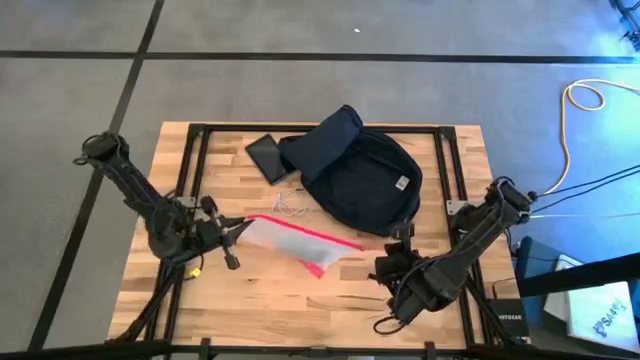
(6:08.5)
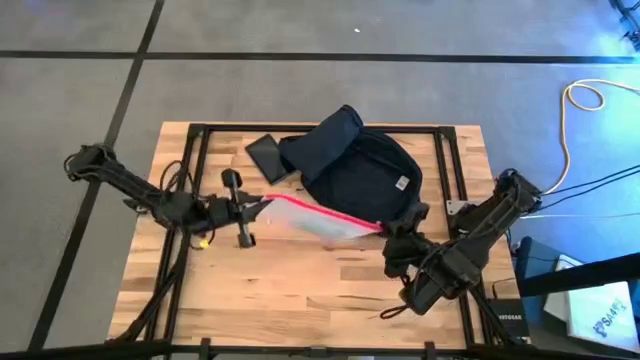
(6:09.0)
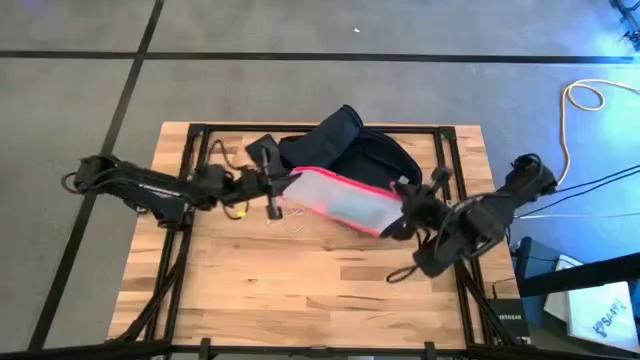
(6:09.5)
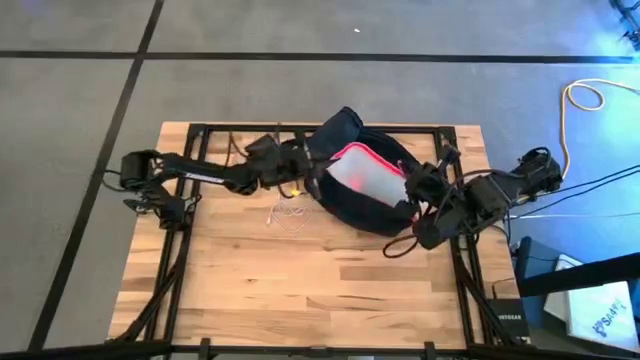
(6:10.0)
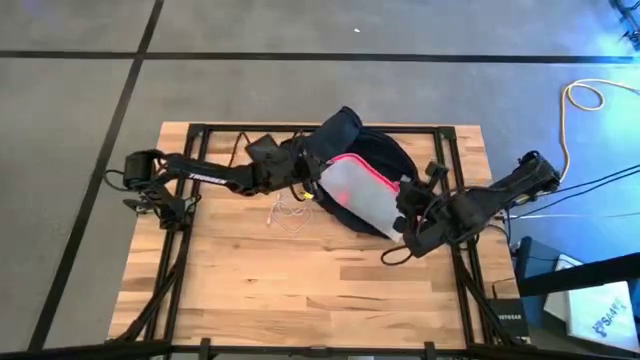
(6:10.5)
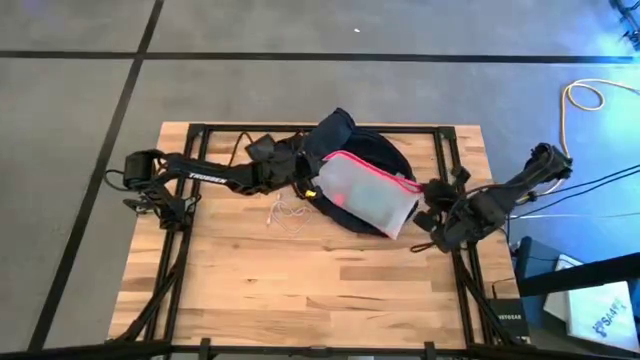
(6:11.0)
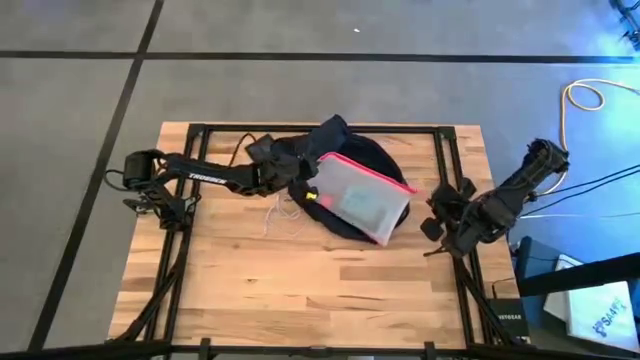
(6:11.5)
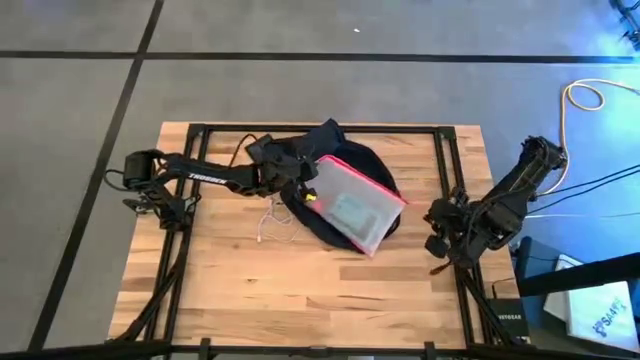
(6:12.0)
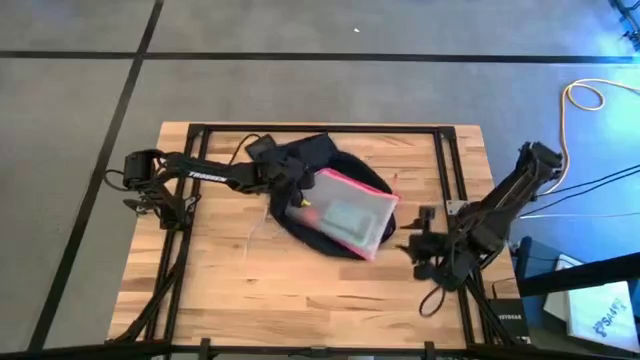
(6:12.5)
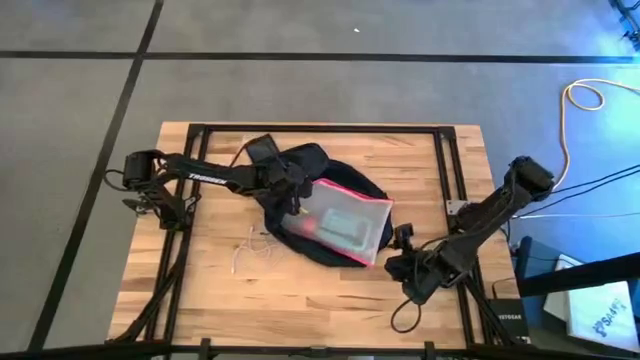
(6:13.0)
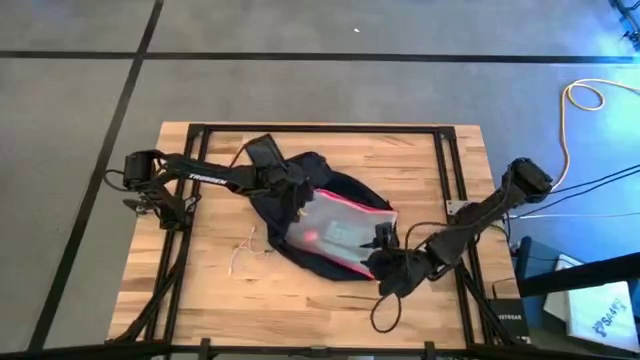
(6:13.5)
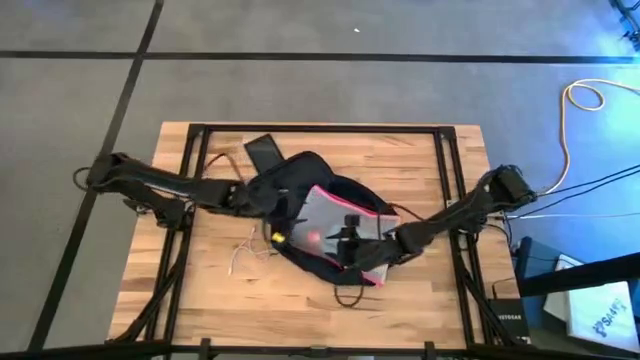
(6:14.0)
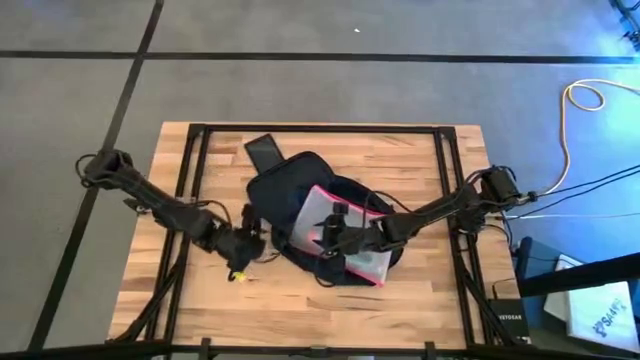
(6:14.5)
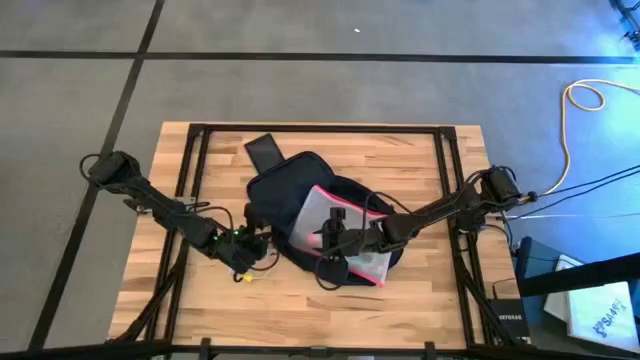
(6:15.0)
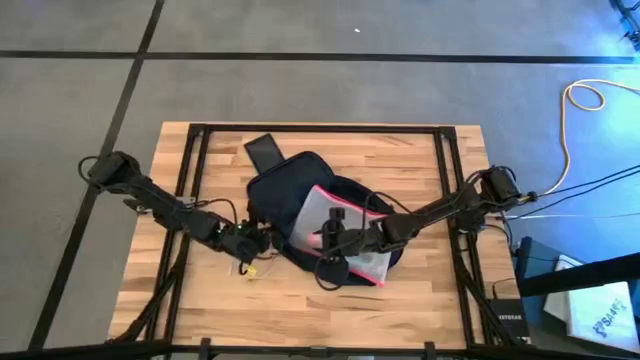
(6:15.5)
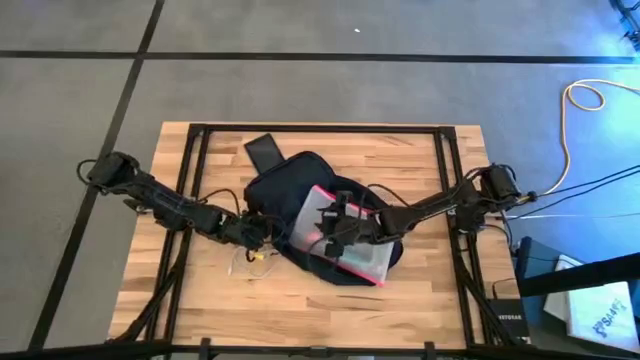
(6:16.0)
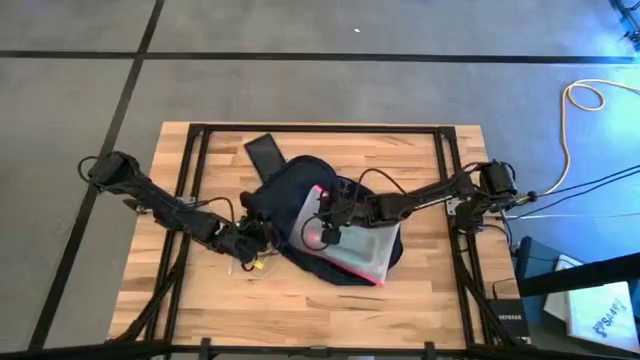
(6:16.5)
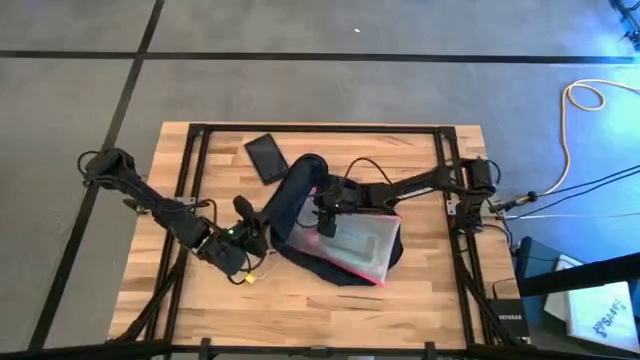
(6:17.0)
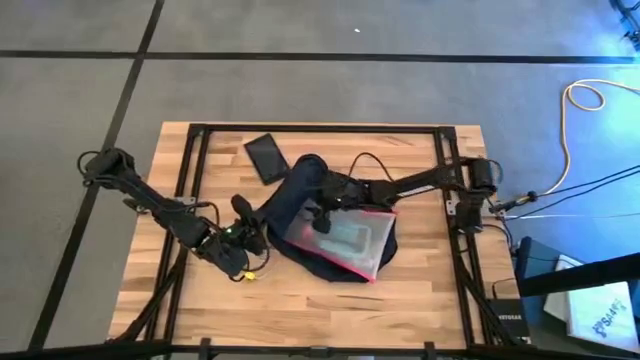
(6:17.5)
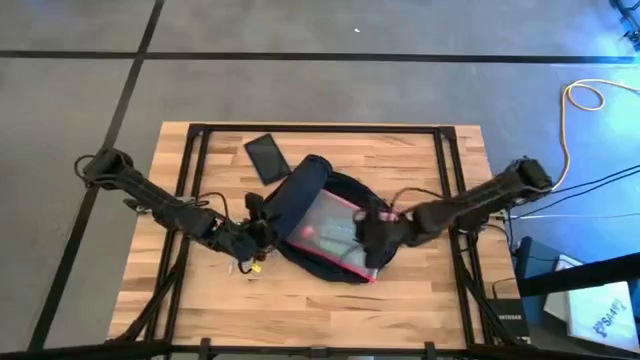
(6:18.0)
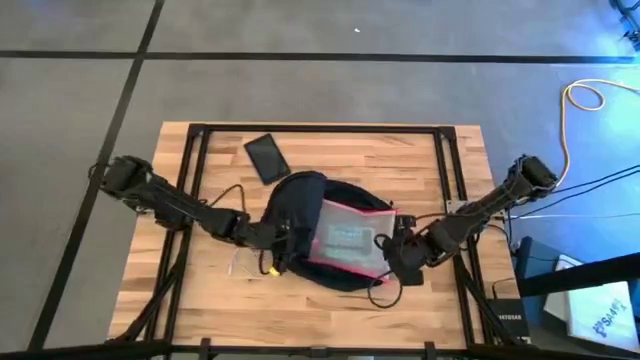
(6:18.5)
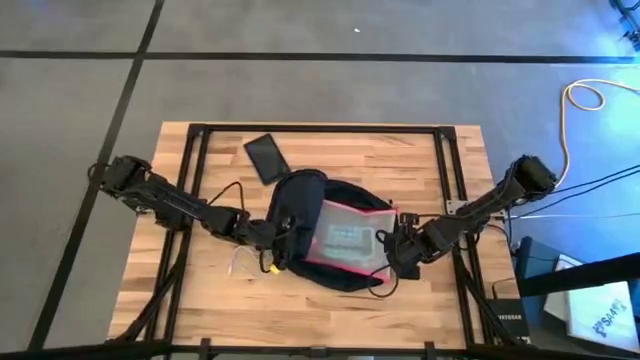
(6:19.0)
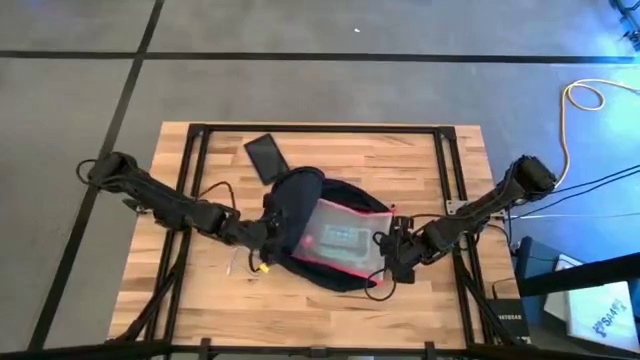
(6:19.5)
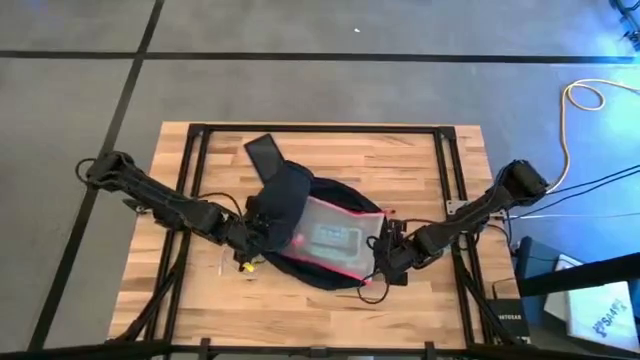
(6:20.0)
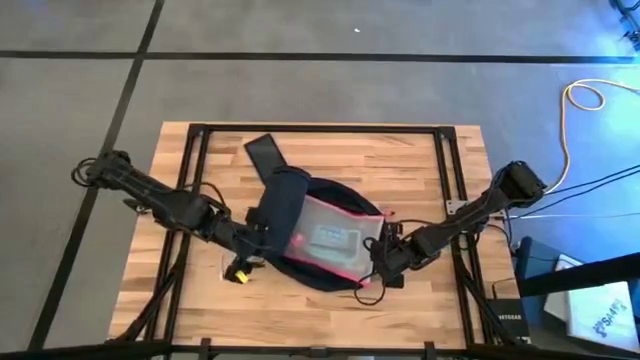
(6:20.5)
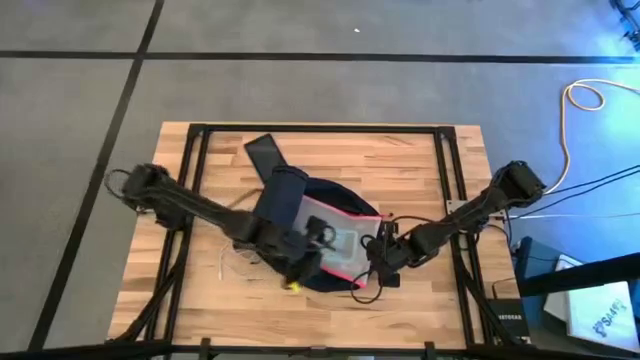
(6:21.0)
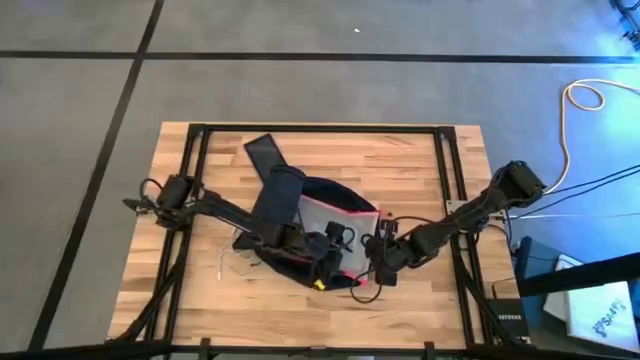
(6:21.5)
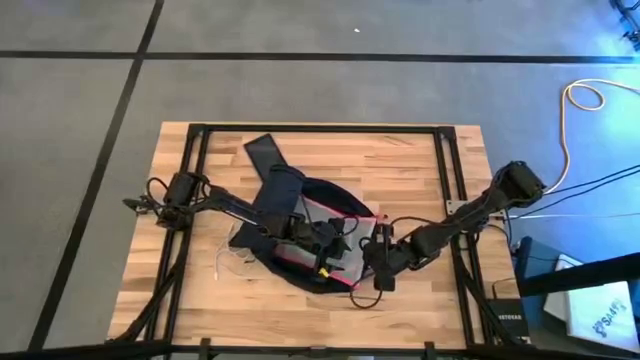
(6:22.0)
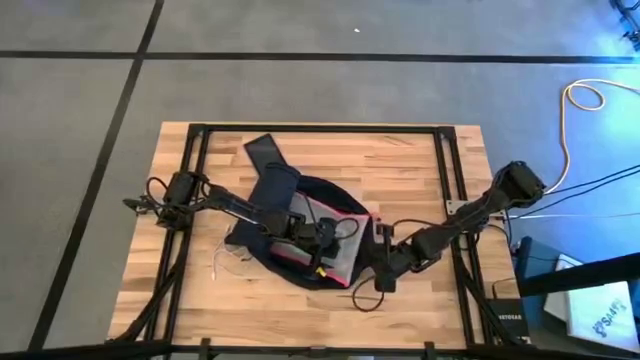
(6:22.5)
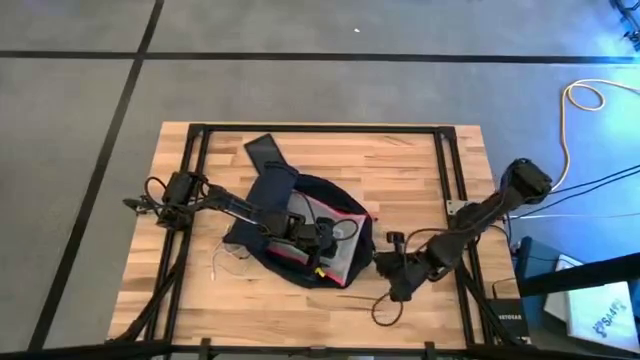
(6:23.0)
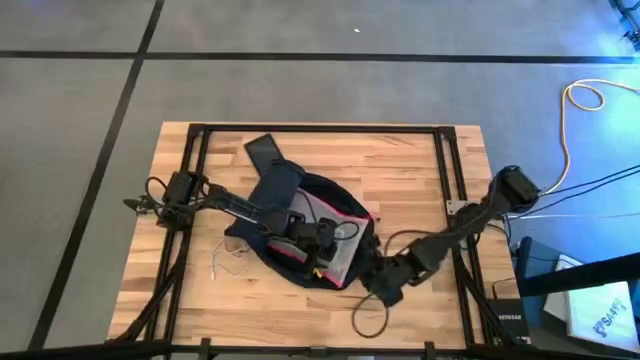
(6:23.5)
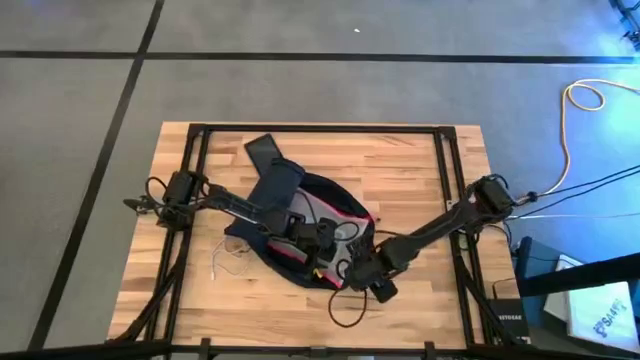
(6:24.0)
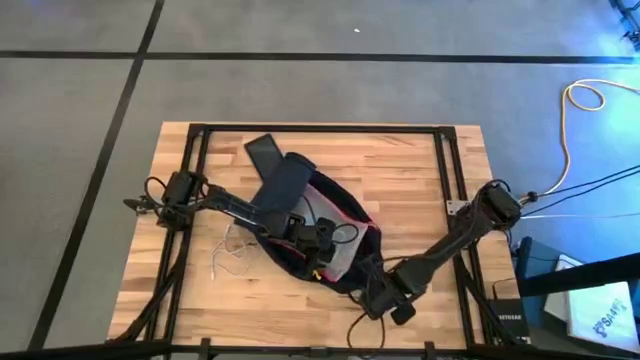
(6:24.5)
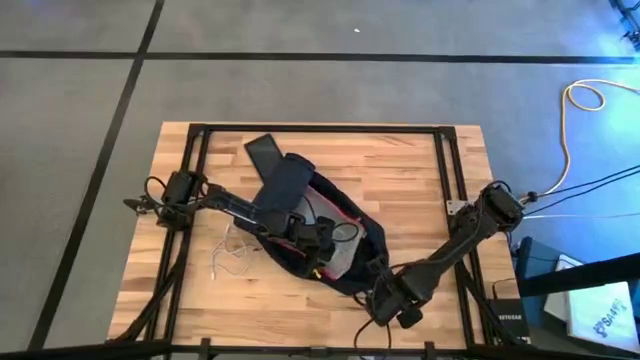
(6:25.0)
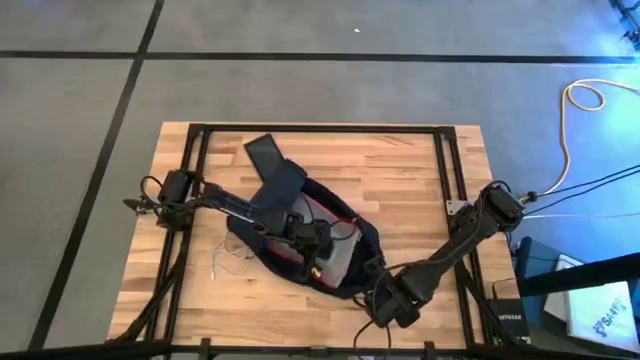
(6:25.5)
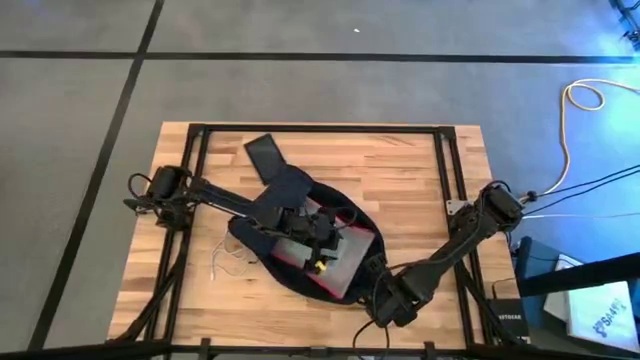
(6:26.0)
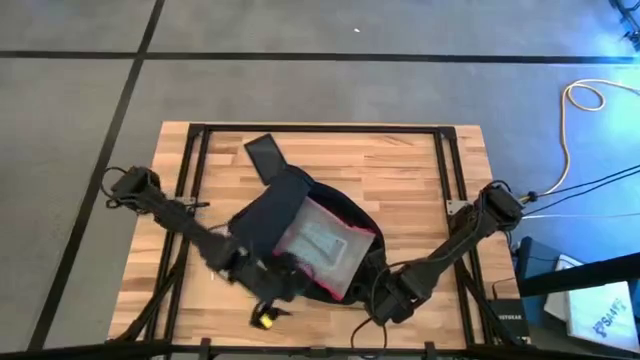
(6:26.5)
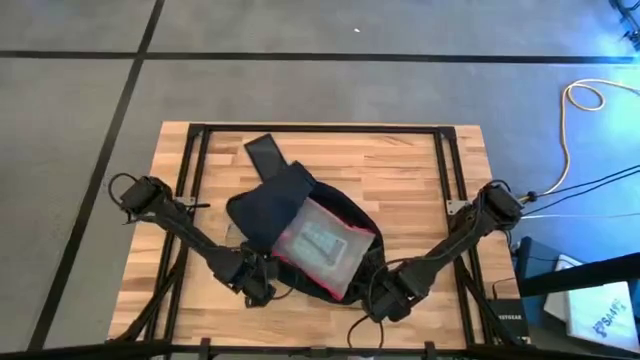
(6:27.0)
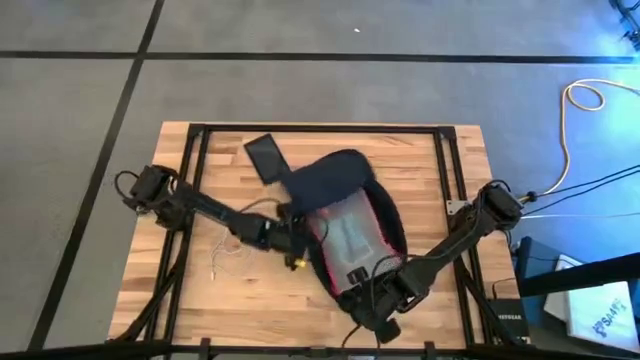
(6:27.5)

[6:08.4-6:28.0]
Task: Unpack backpack
Put the transparent zip bag into the blue backpack

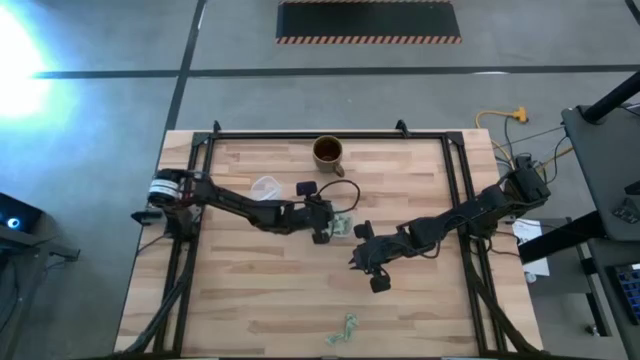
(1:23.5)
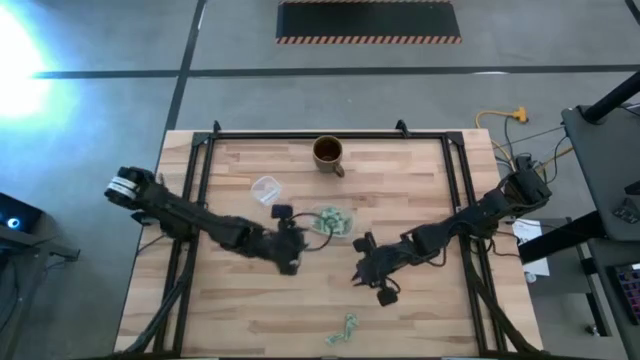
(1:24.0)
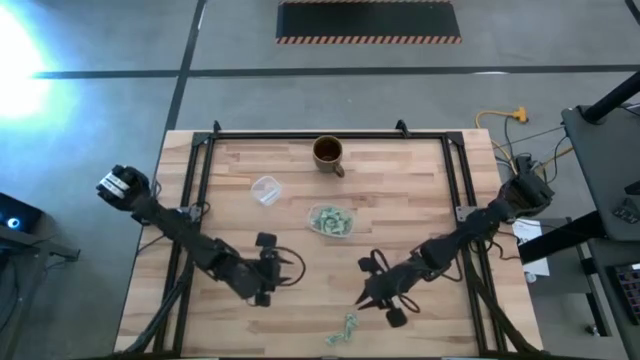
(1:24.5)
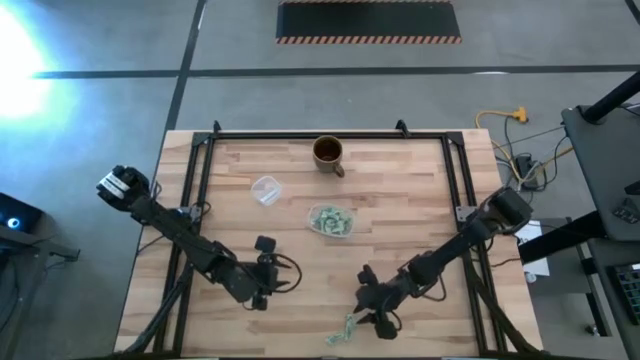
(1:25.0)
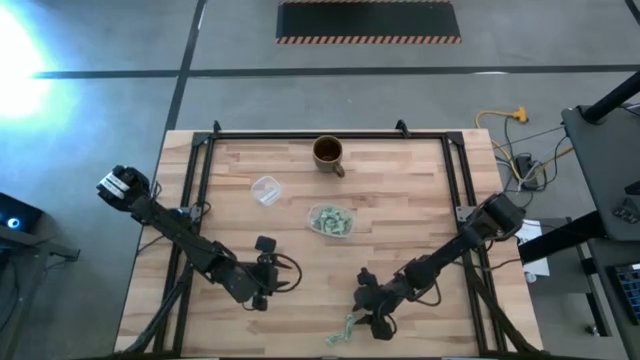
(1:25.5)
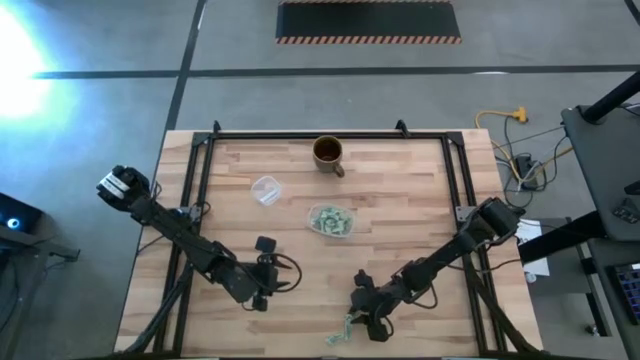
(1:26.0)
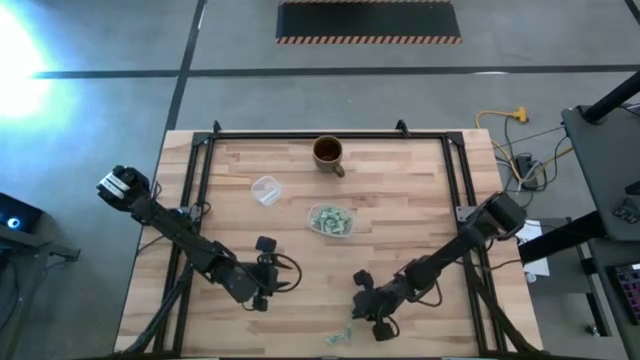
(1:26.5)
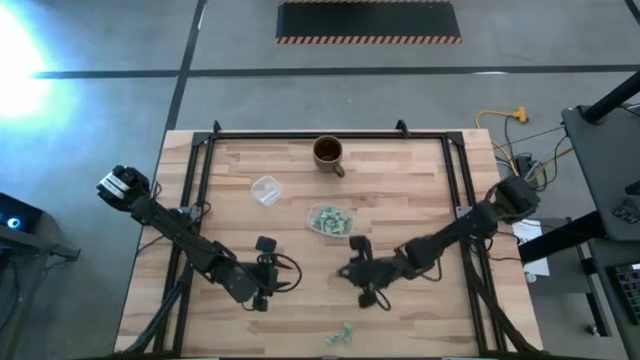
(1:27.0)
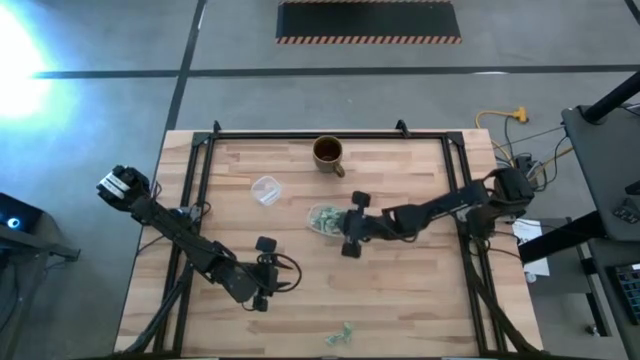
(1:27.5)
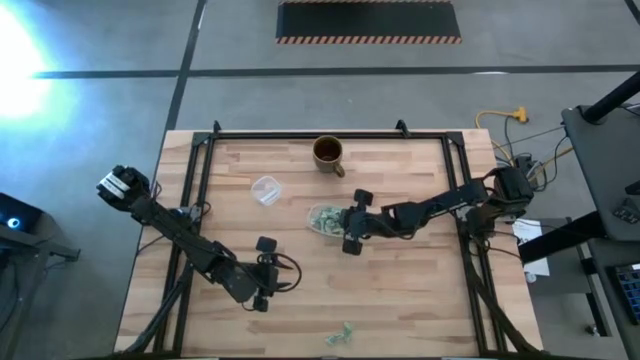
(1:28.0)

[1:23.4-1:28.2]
Task: Pick and place Stevia / Truvia into bins
Put the green stevia packet into the transparent container
